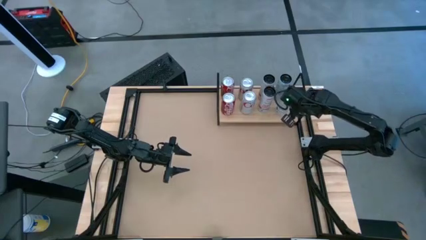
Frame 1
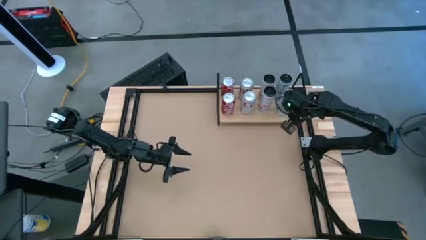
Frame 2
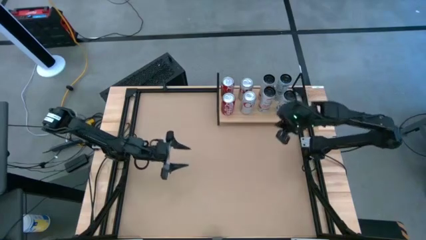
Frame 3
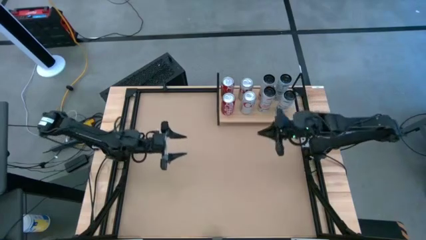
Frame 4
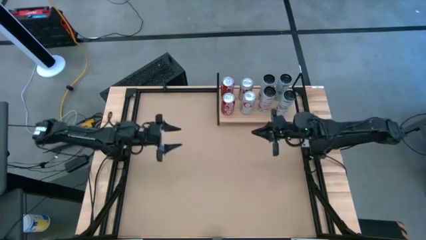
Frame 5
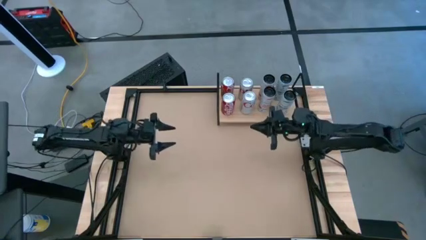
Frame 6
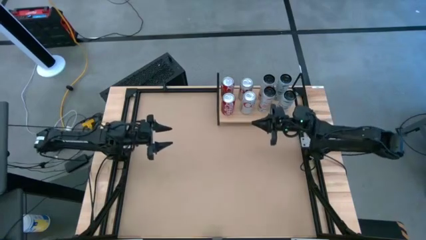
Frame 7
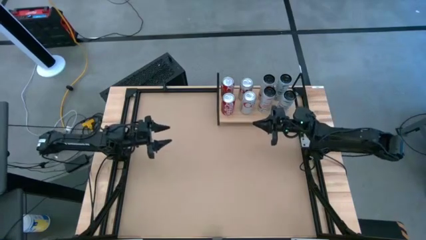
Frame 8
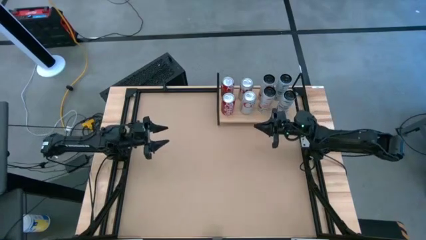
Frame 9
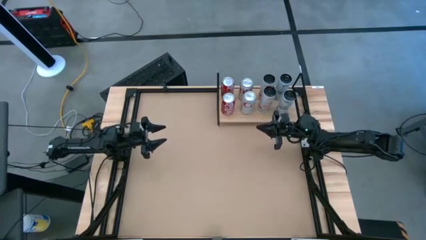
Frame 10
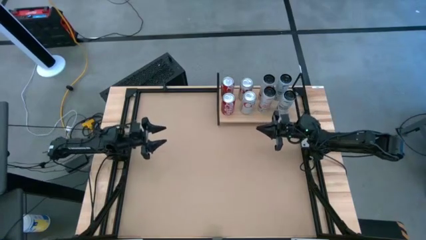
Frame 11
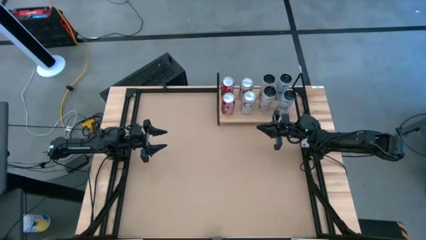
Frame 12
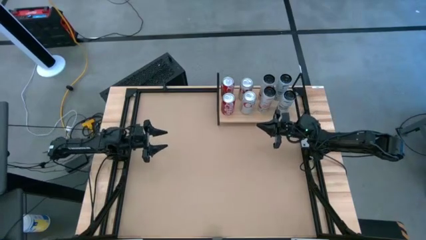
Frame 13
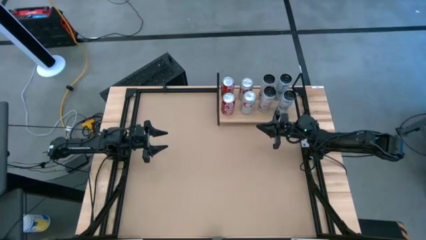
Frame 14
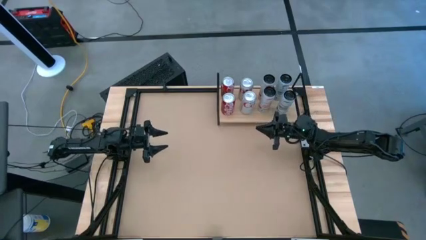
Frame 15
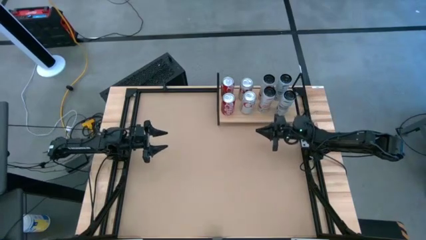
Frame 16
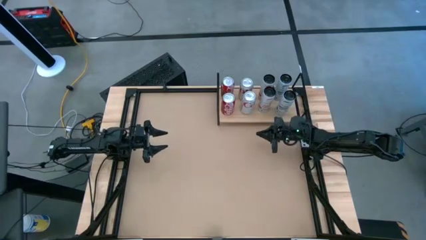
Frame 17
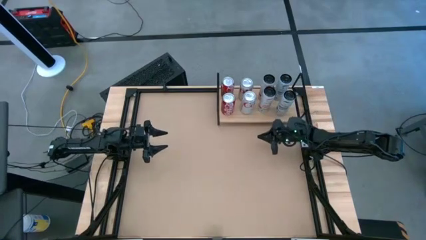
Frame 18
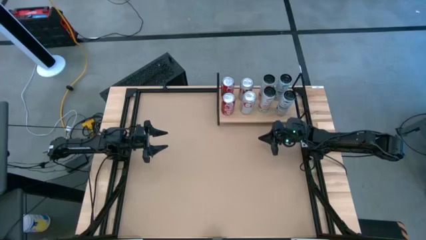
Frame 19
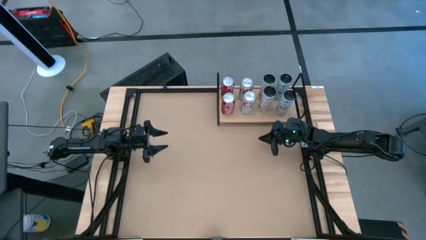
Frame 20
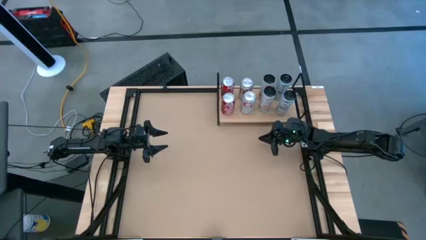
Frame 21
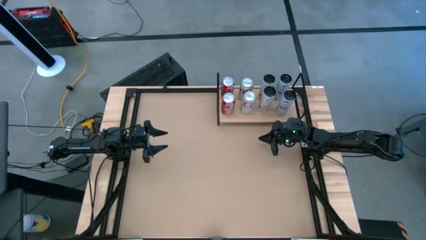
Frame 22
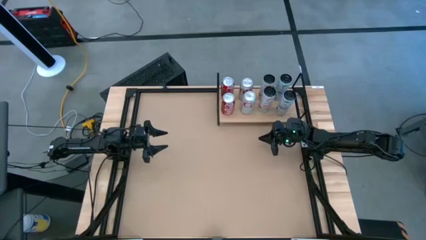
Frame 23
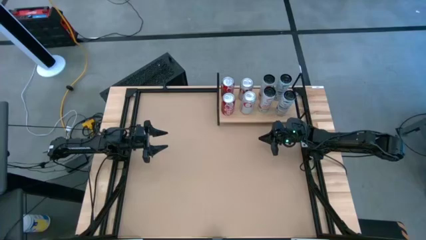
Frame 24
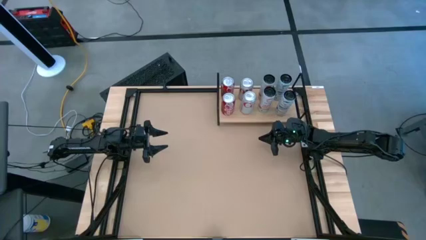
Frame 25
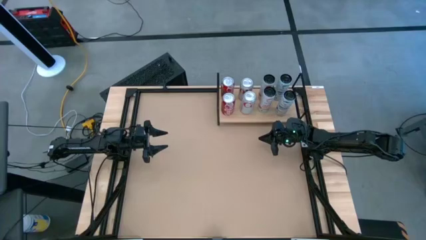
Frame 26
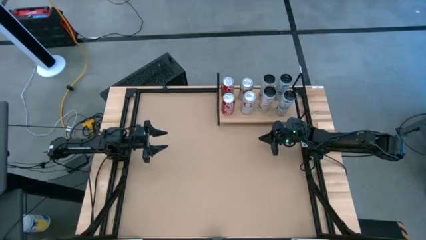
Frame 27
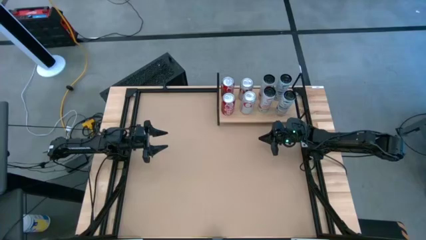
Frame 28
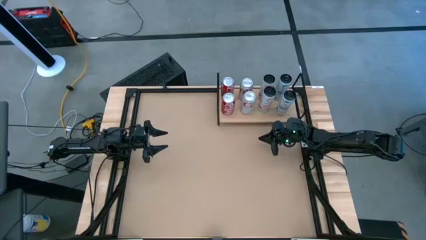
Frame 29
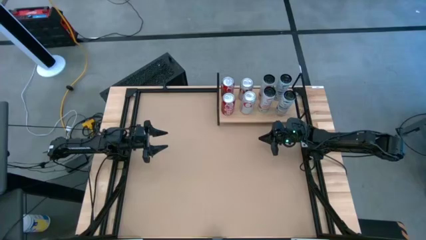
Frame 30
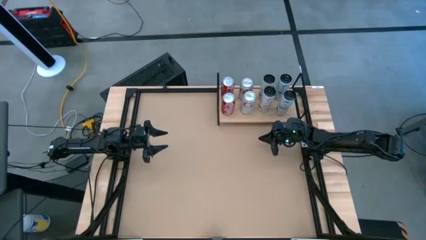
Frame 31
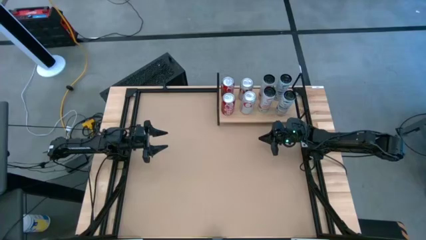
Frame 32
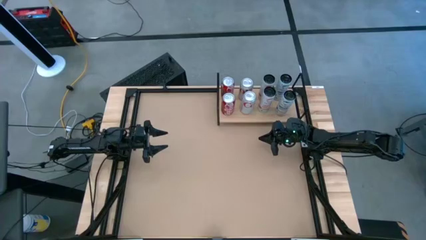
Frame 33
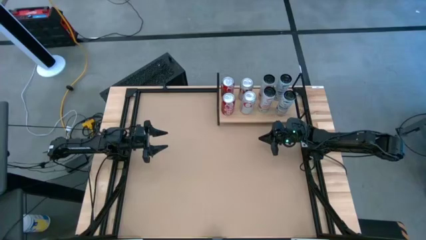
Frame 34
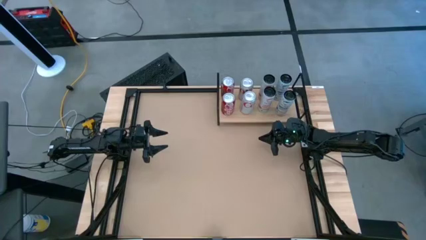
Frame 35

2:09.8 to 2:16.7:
Task: Place canned beverage on shelf
Return to Home Position
